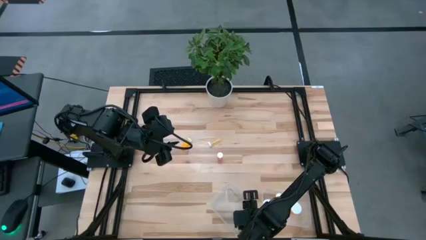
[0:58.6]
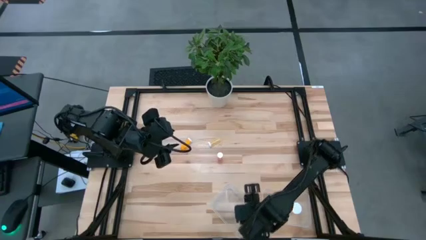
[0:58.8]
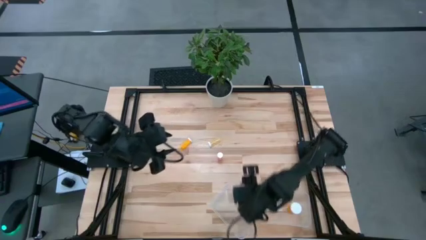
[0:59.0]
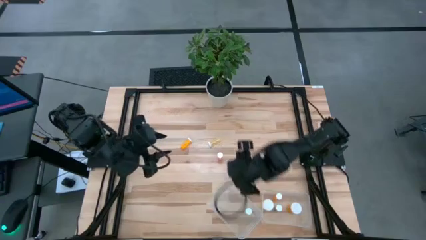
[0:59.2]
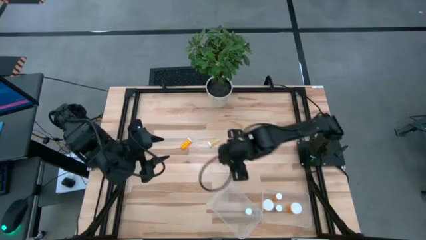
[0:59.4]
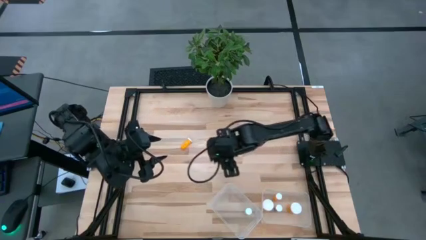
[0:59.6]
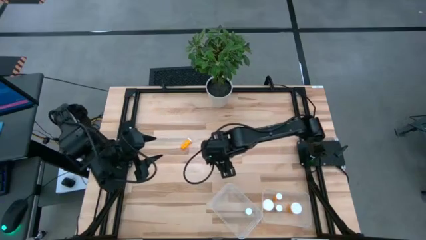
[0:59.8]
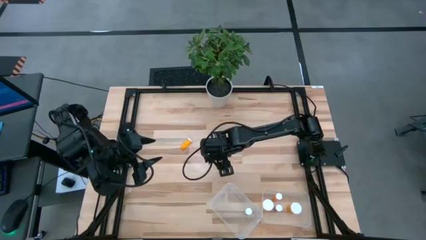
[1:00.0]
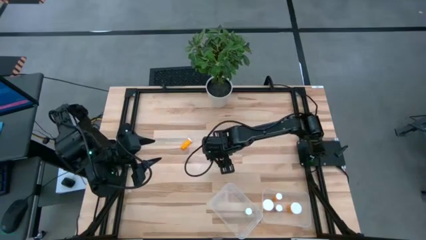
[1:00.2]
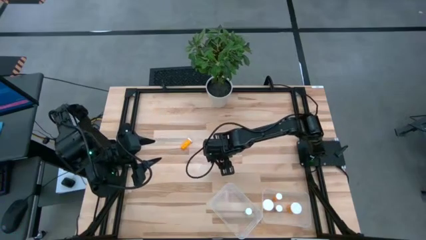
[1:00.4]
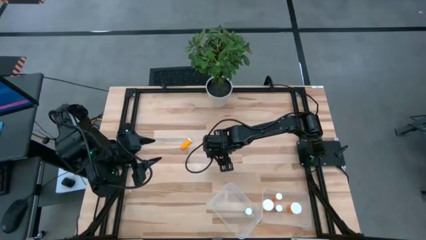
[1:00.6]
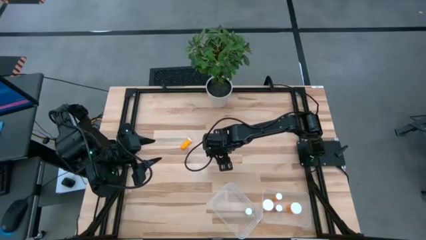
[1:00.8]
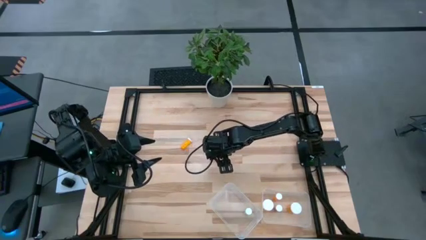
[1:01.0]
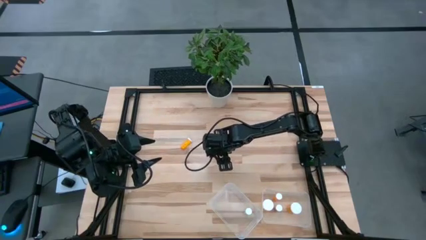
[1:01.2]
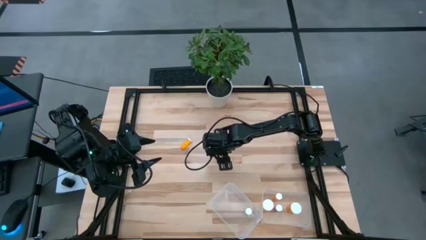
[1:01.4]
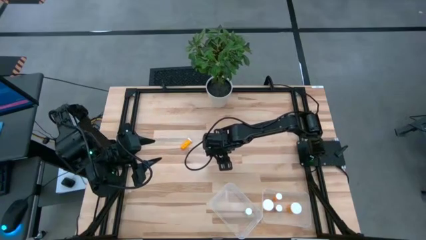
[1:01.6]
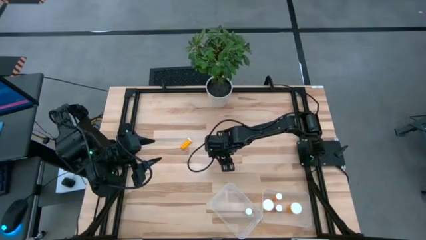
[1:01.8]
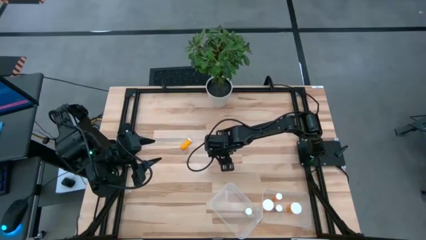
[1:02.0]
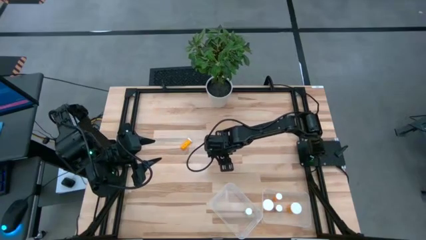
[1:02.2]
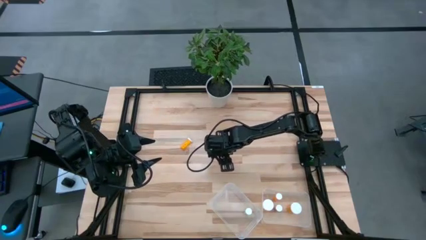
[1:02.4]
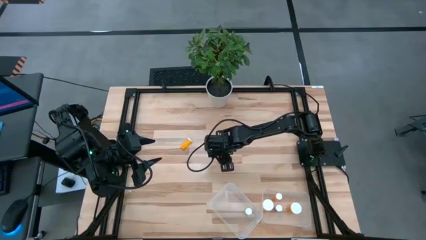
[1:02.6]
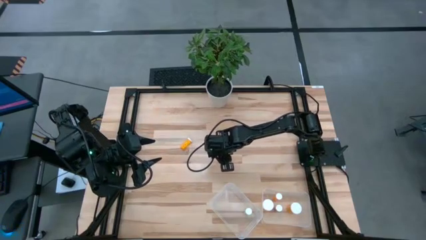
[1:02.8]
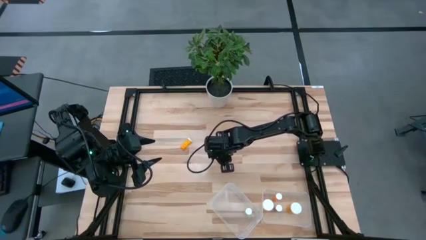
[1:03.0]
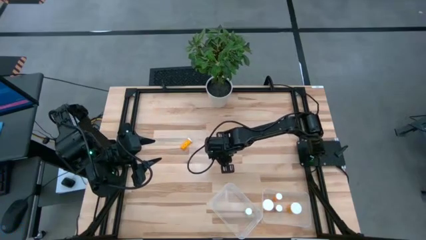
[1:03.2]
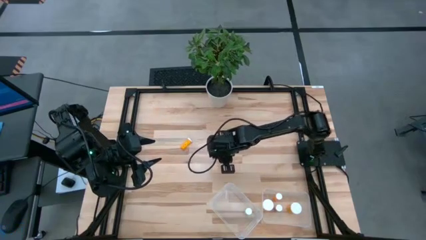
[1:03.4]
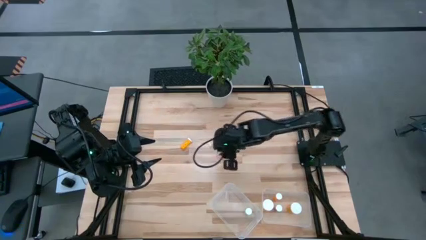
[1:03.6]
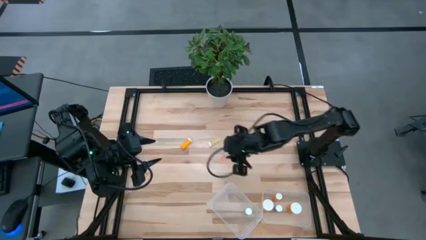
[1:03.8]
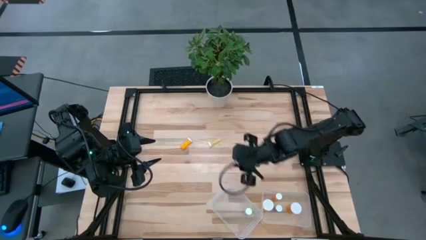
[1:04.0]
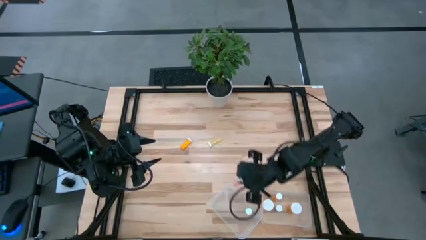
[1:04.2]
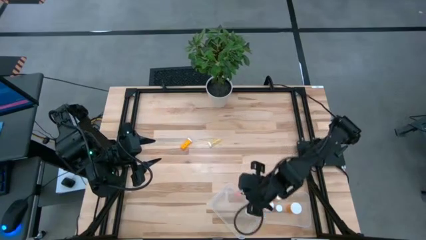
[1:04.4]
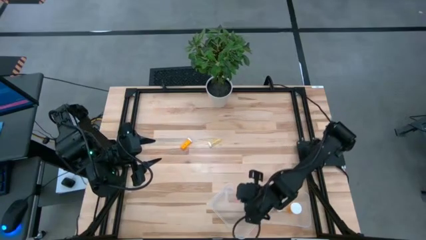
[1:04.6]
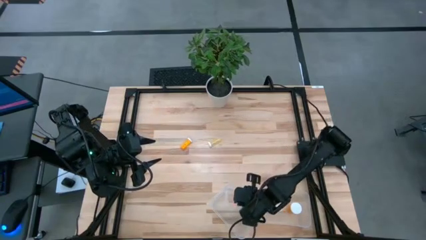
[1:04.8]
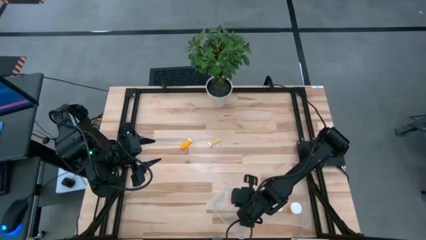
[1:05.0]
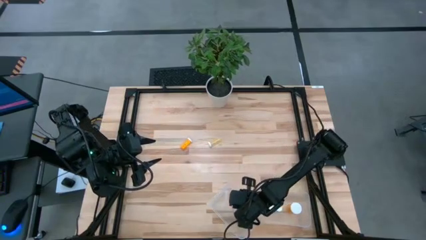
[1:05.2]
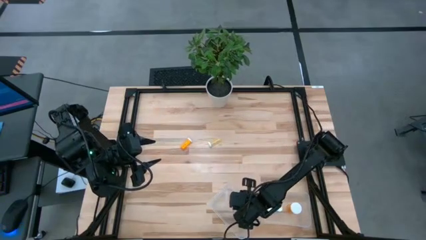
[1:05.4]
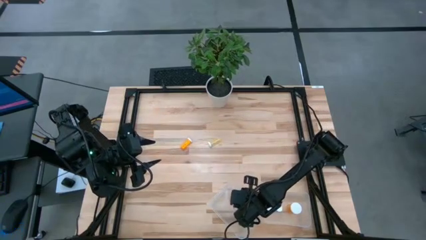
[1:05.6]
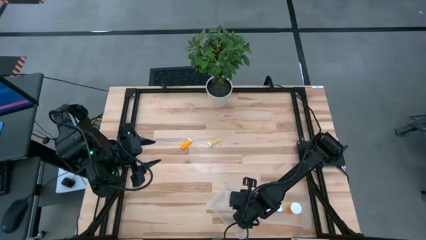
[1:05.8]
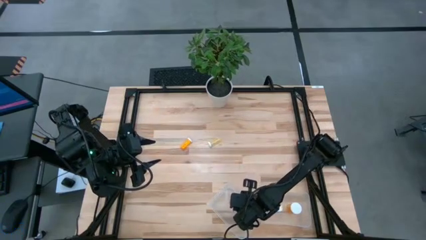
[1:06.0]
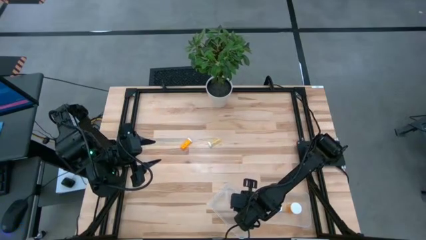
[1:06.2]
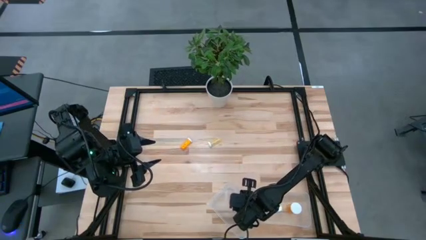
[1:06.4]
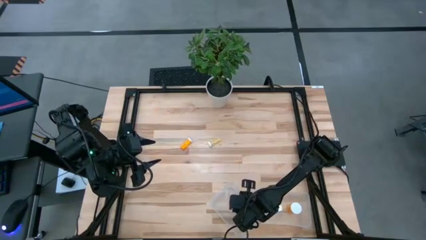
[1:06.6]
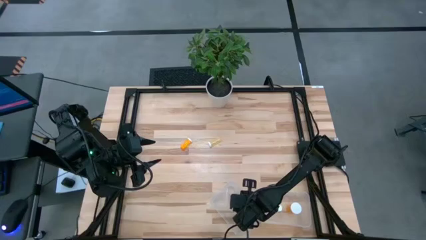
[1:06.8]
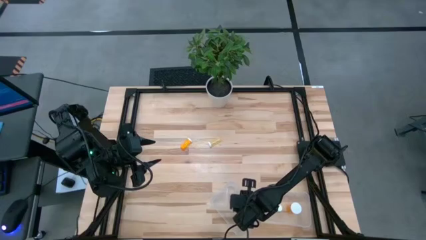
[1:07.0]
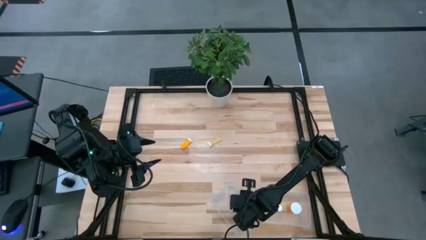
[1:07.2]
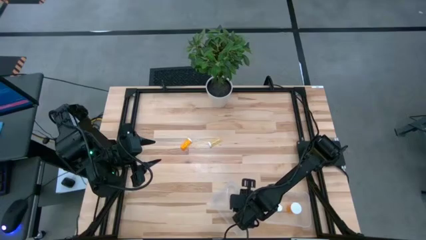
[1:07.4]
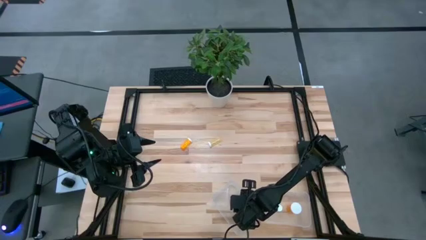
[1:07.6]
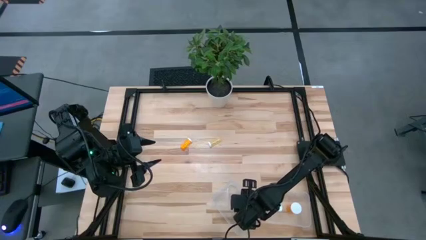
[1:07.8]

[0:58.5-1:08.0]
Task: Pick and place medicine bottles into bin by pill shape (circle, oval)
Put the red bottle into the left transparent bin

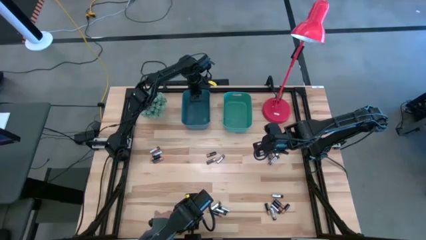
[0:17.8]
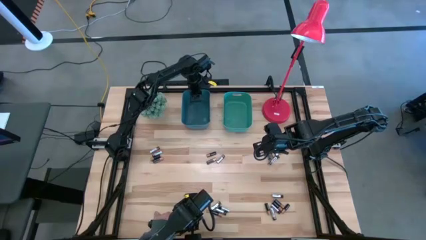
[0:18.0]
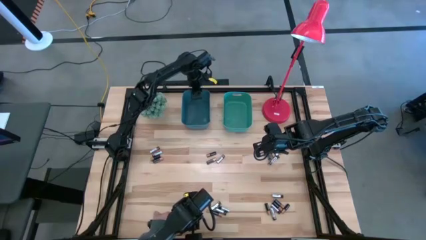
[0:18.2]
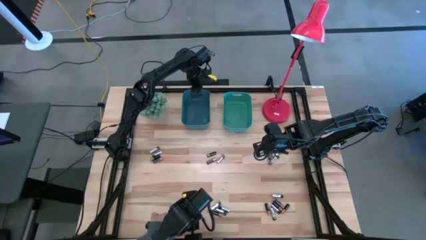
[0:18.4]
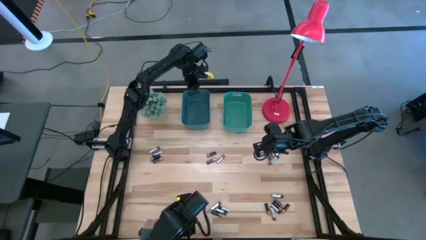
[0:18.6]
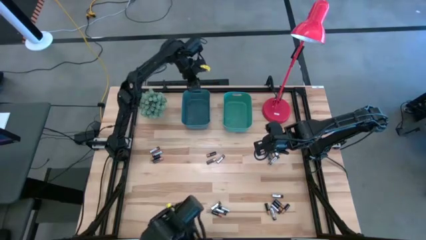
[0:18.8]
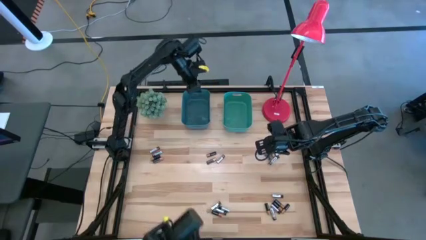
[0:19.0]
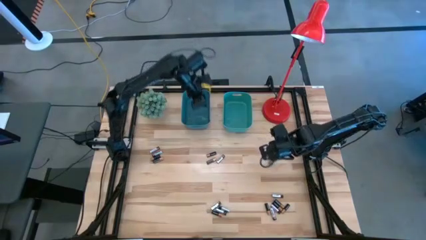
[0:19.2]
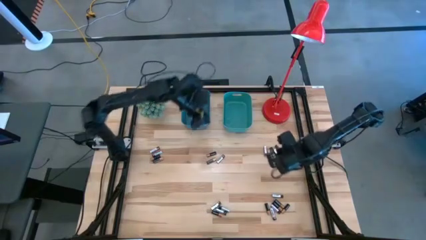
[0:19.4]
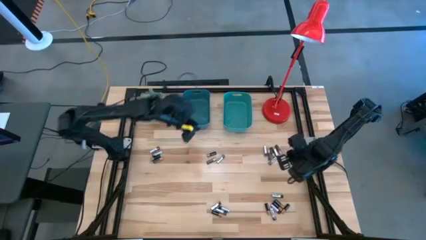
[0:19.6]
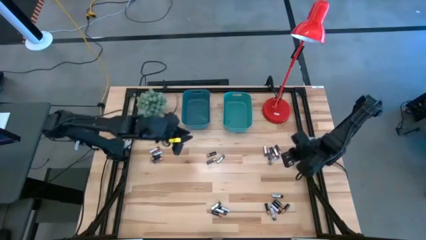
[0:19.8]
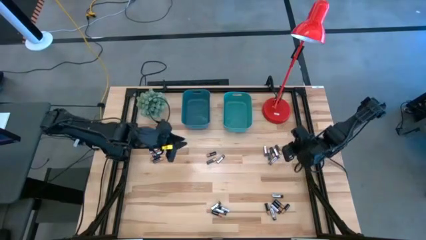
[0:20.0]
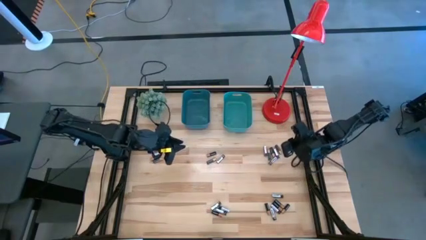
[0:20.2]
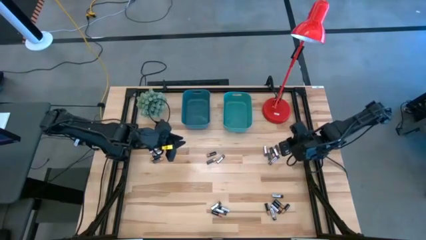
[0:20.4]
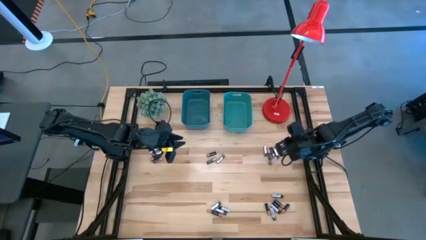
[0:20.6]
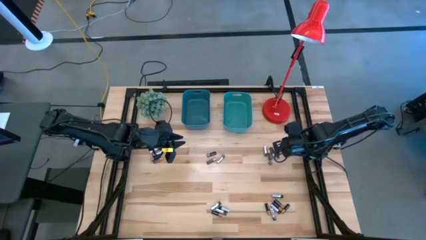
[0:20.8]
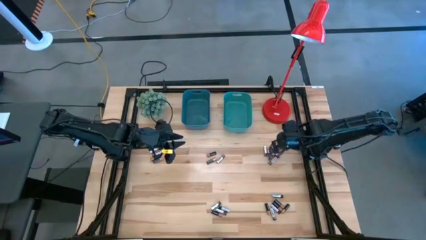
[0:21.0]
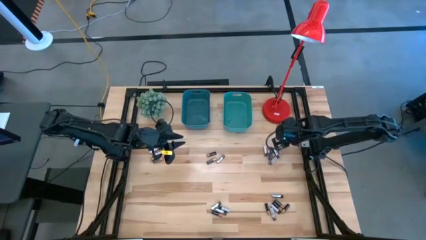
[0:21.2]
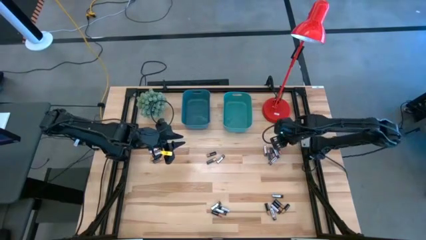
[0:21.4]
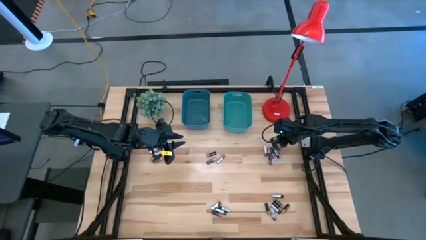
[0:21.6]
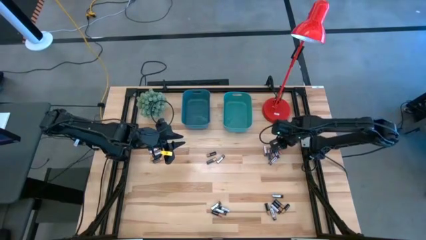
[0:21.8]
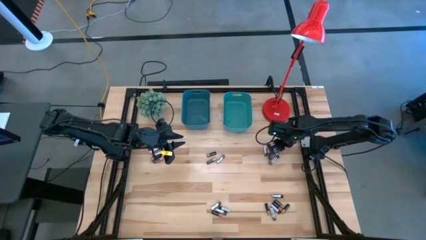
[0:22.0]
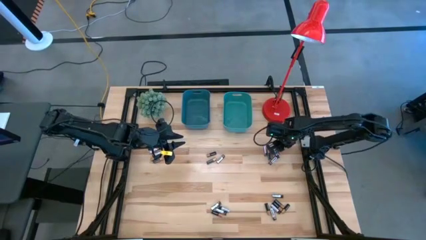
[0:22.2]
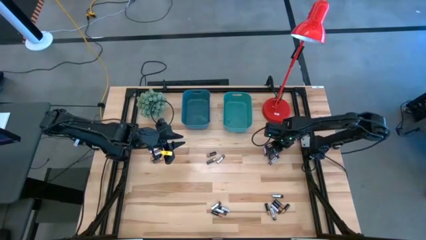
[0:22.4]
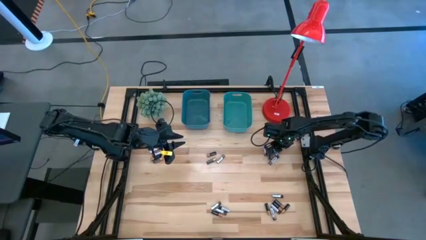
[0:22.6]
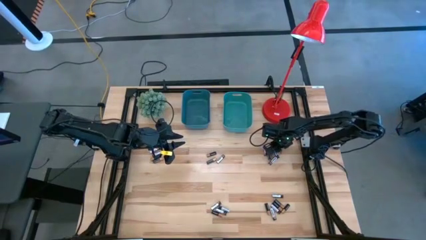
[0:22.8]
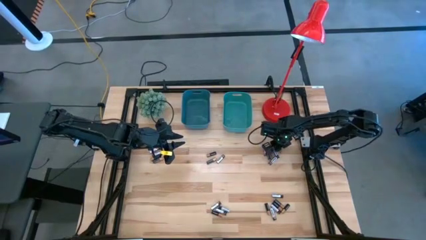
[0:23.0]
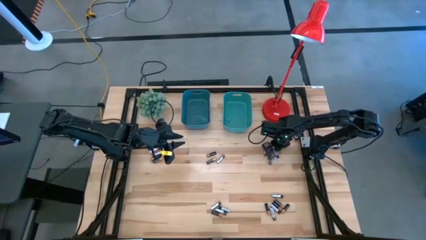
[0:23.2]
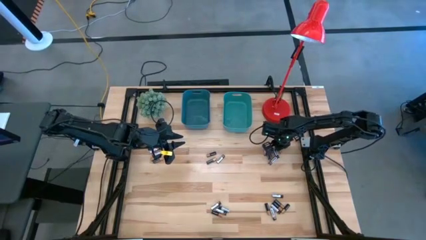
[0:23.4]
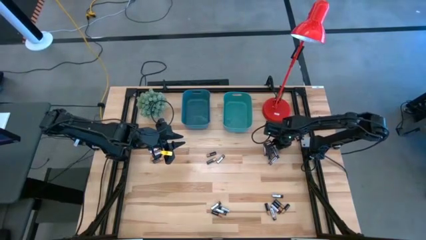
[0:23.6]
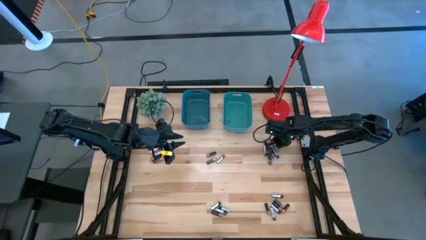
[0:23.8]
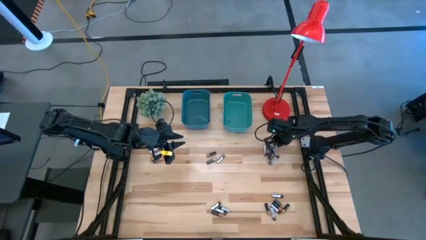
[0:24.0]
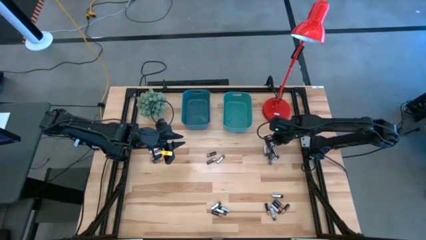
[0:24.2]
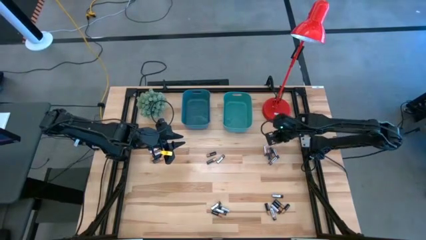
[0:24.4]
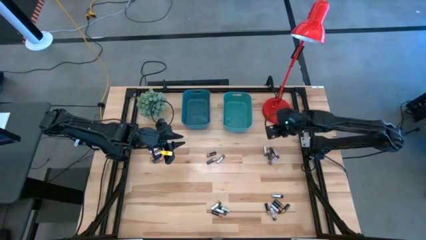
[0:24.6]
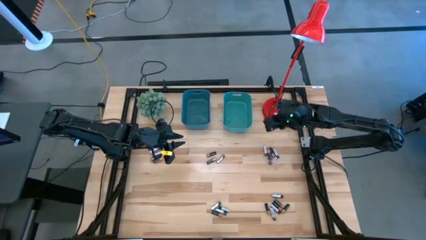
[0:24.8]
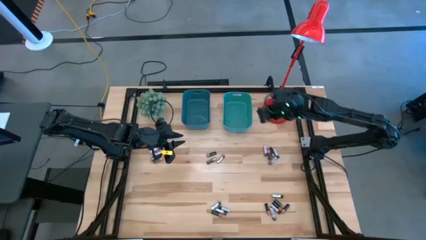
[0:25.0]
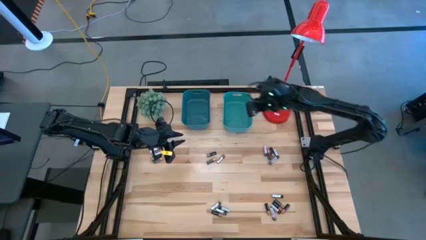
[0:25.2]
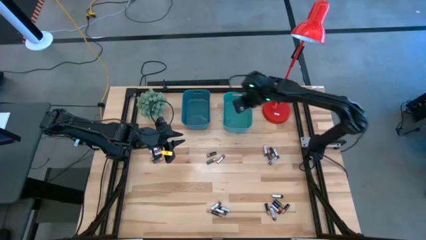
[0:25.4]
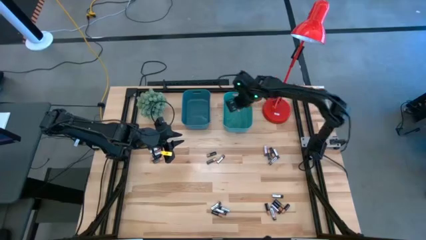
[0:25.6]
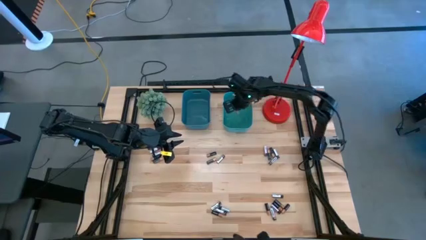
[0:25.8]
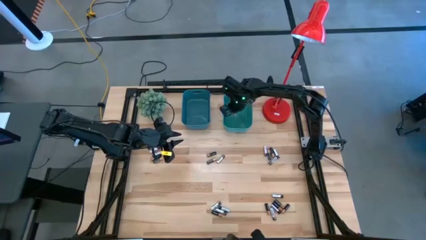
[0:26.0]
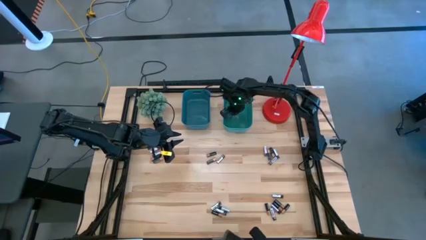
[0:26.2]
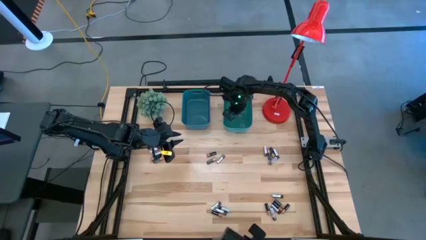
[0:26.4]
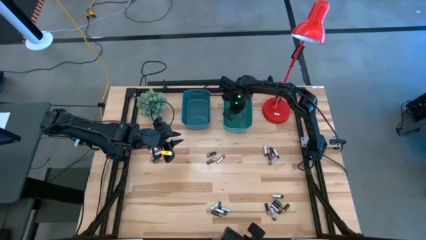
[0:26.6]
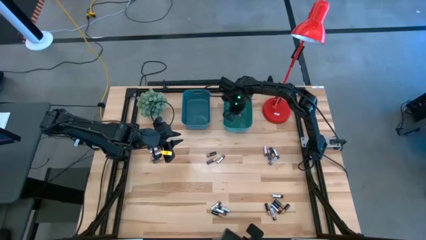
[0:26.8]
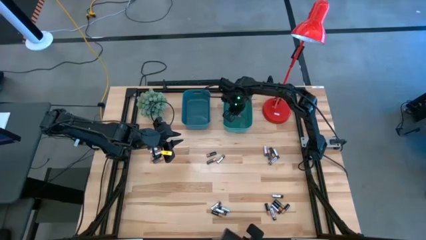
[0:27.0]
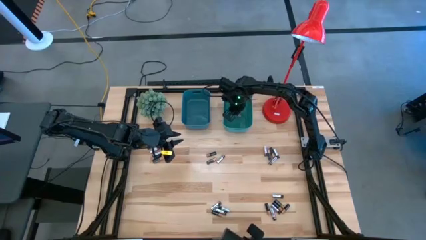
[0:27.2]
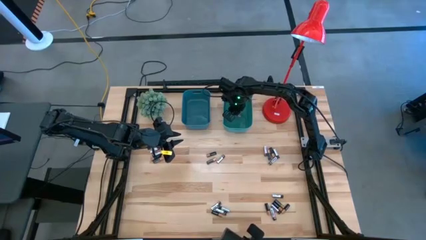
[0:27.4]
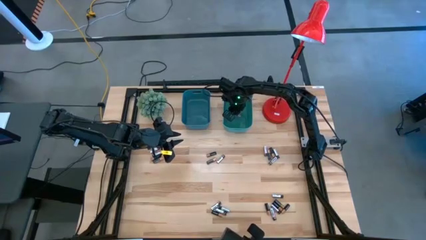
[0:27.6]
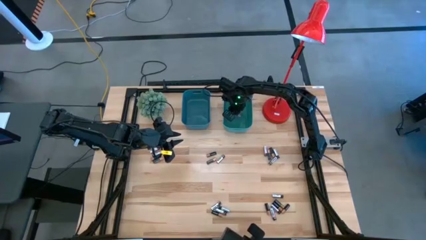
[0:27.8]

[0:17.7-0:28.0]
Task: Sort batteries
Put the black battery into the green bin
